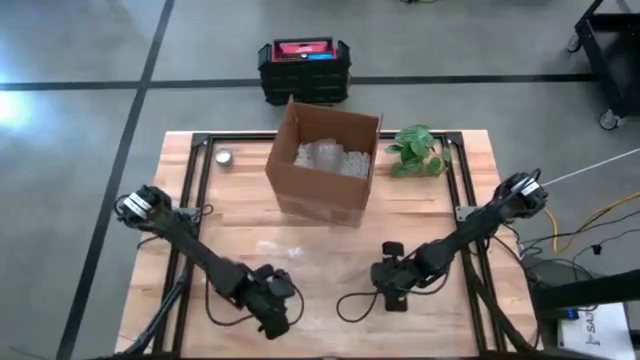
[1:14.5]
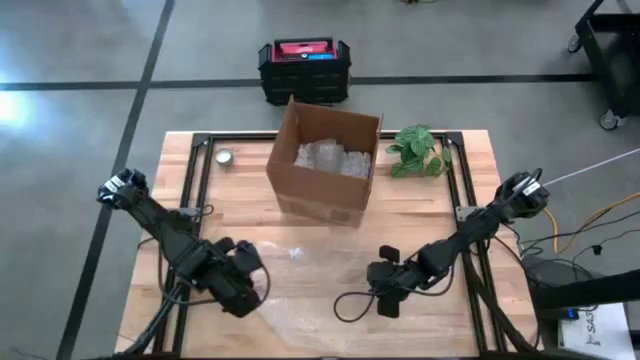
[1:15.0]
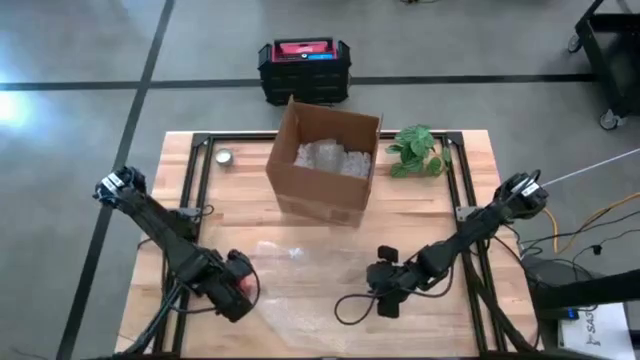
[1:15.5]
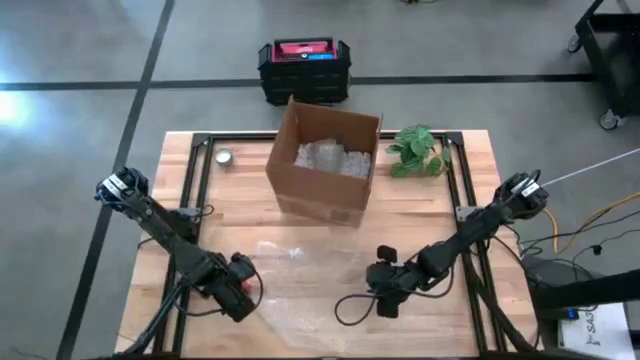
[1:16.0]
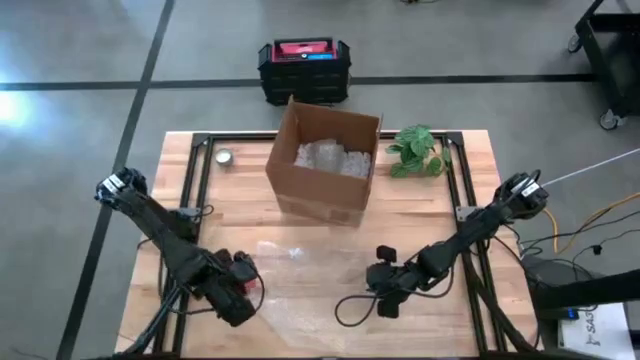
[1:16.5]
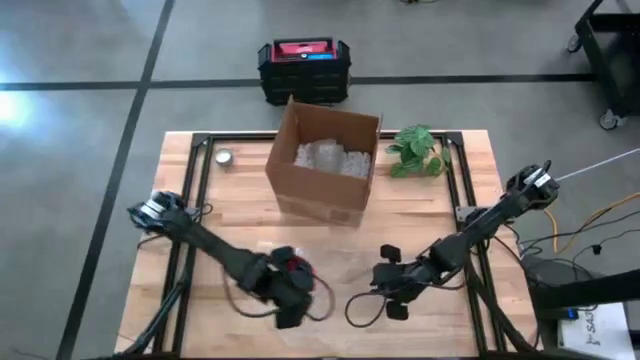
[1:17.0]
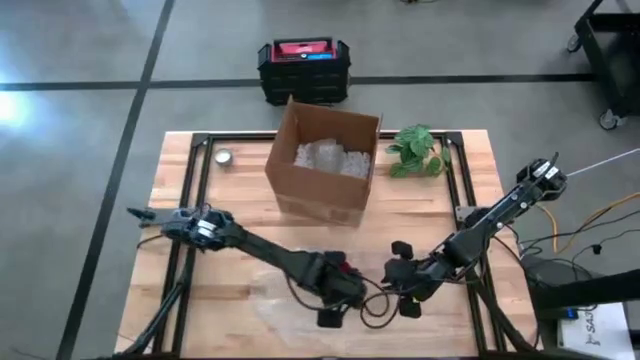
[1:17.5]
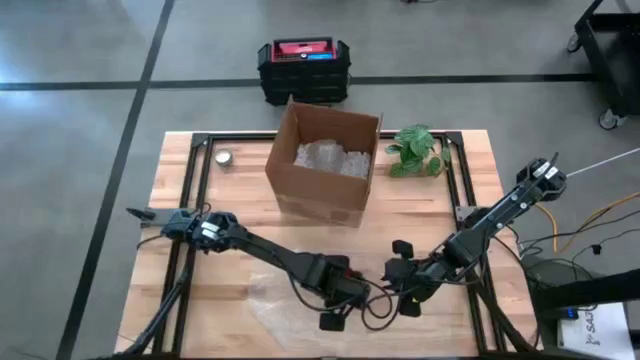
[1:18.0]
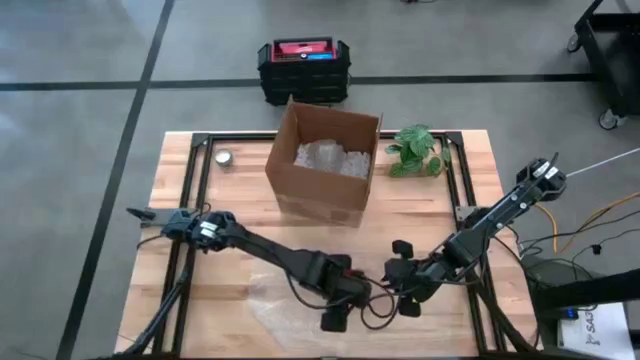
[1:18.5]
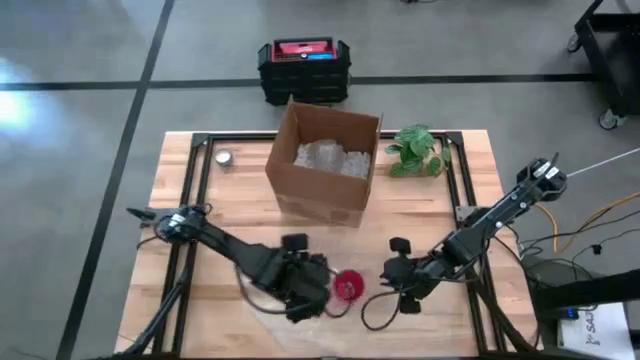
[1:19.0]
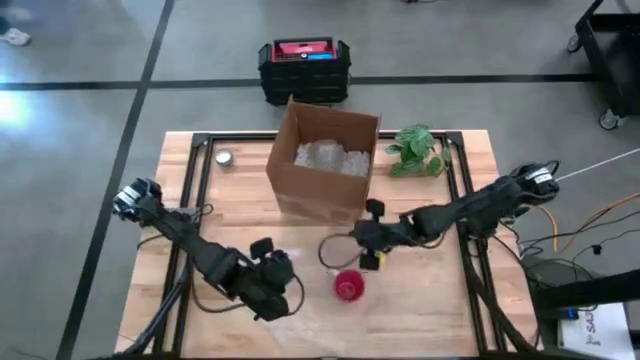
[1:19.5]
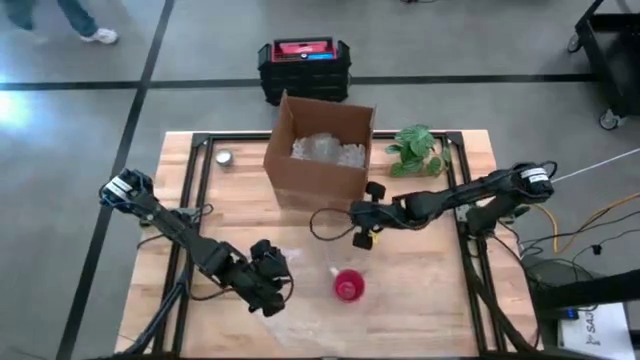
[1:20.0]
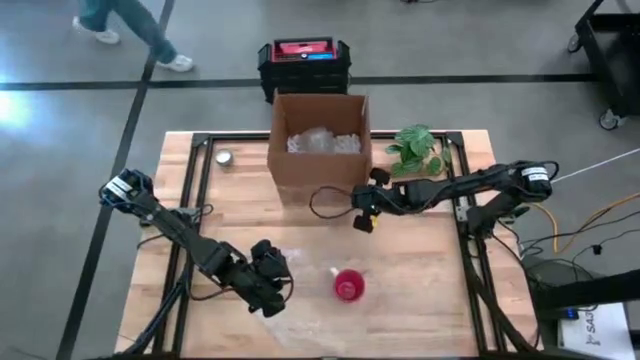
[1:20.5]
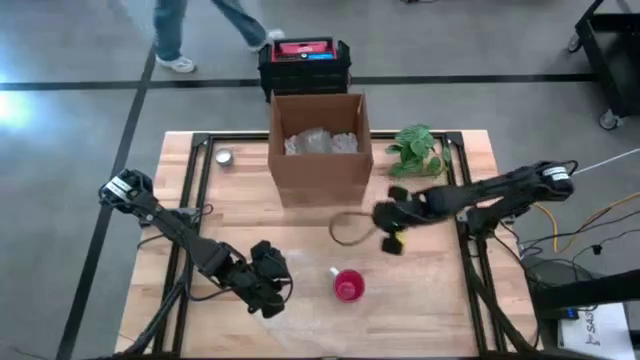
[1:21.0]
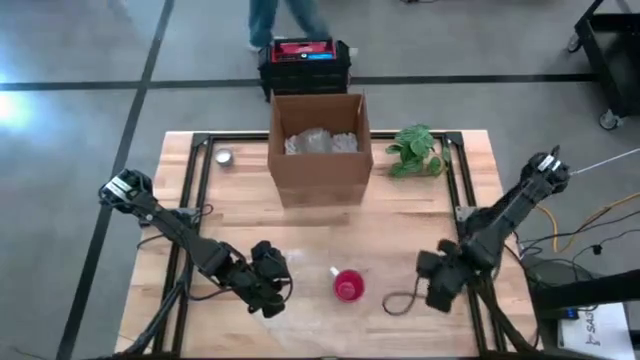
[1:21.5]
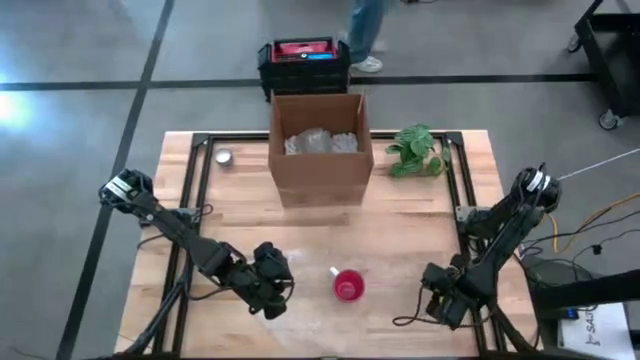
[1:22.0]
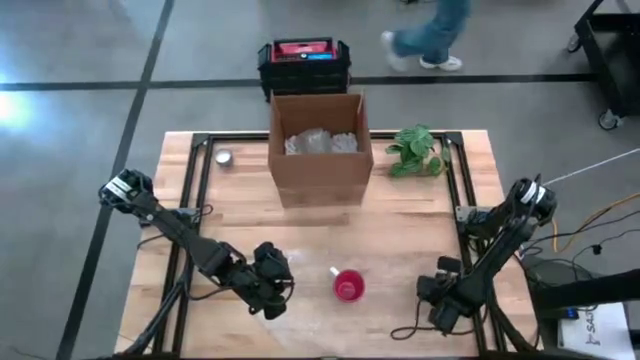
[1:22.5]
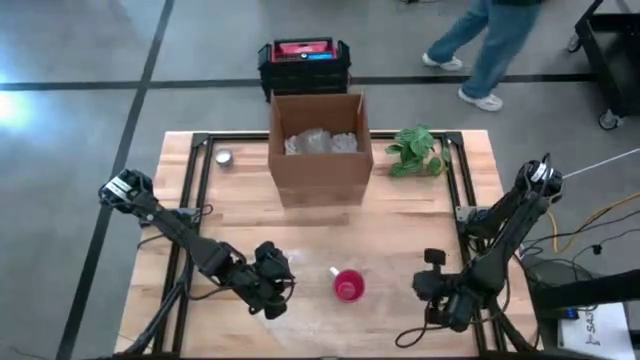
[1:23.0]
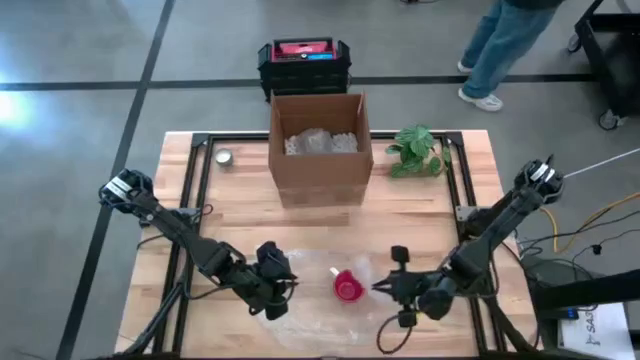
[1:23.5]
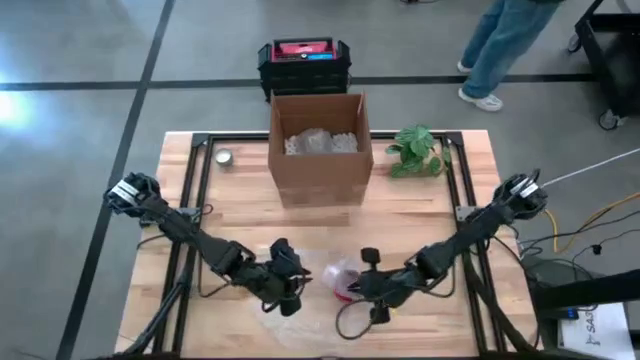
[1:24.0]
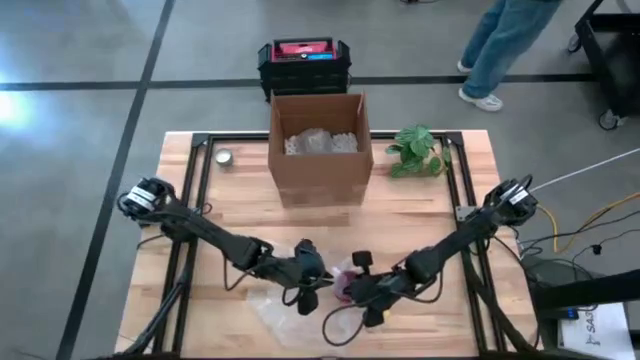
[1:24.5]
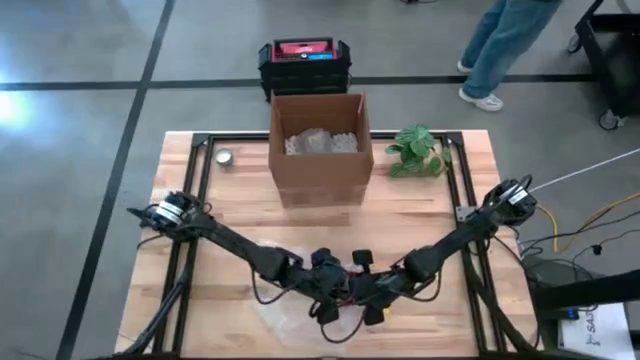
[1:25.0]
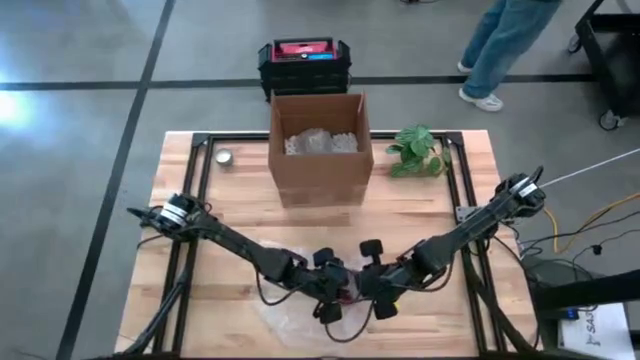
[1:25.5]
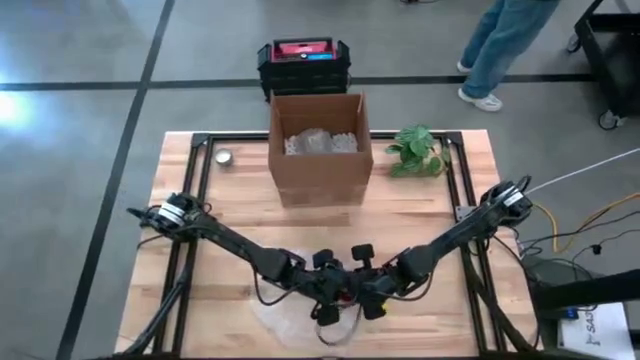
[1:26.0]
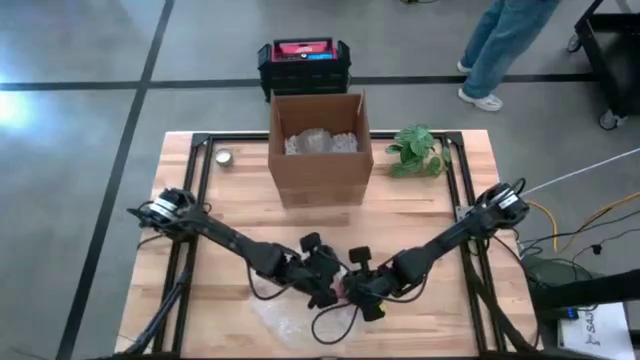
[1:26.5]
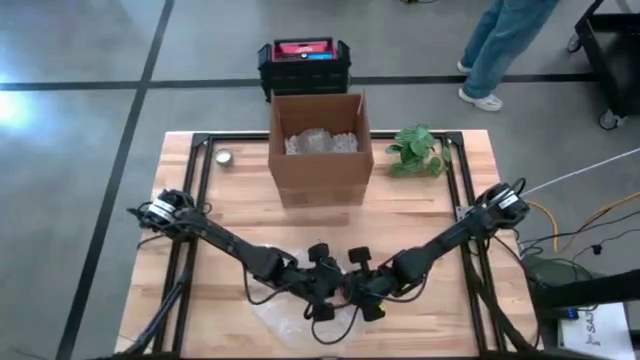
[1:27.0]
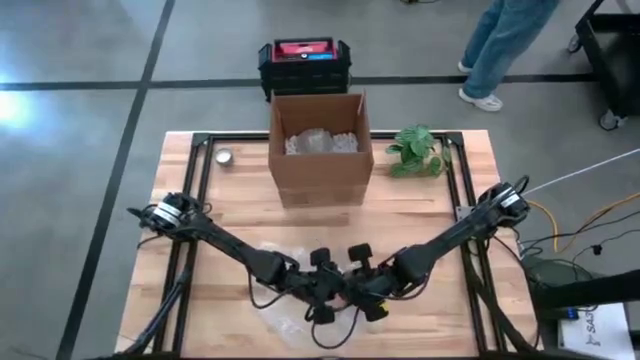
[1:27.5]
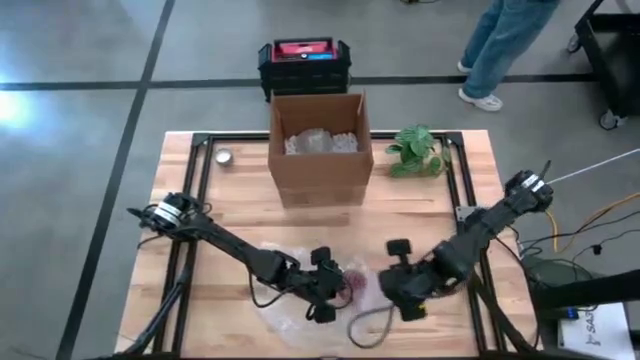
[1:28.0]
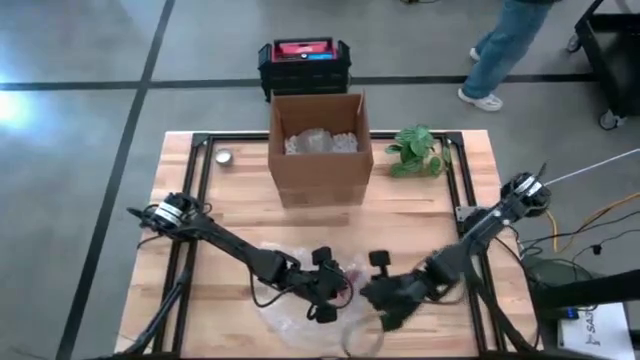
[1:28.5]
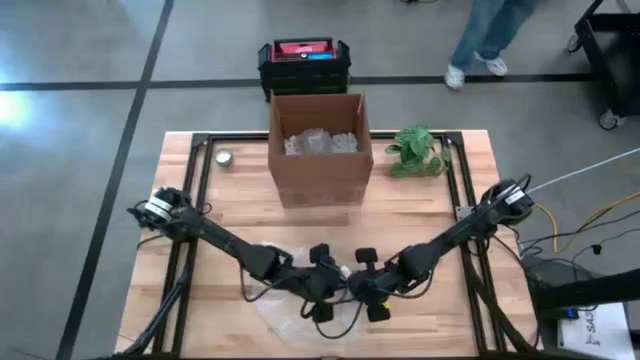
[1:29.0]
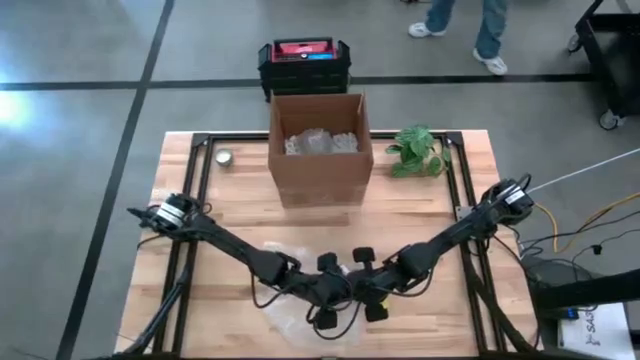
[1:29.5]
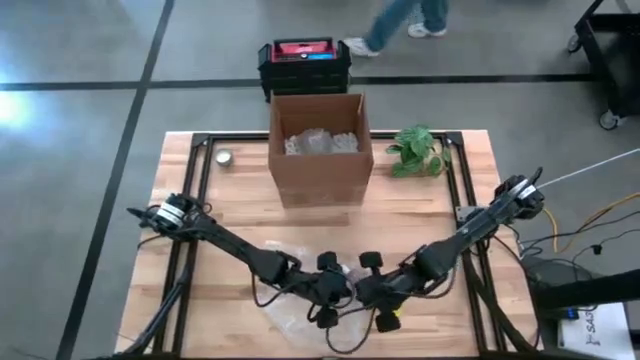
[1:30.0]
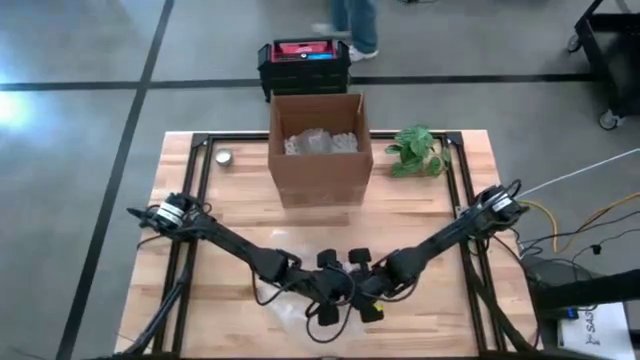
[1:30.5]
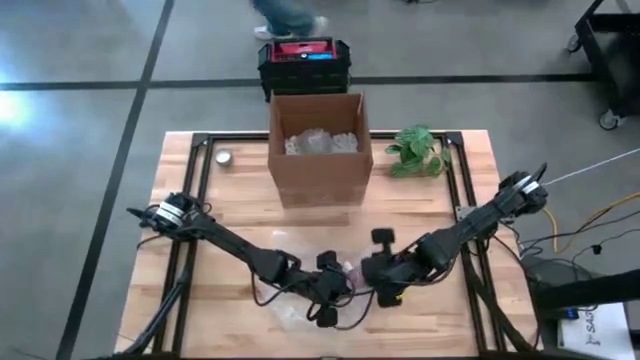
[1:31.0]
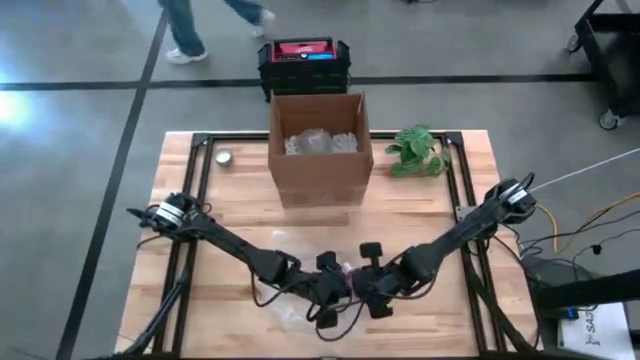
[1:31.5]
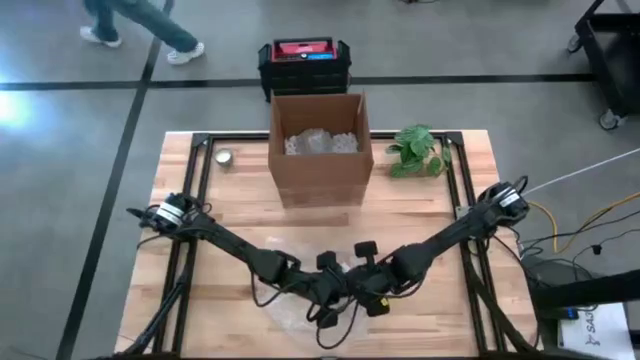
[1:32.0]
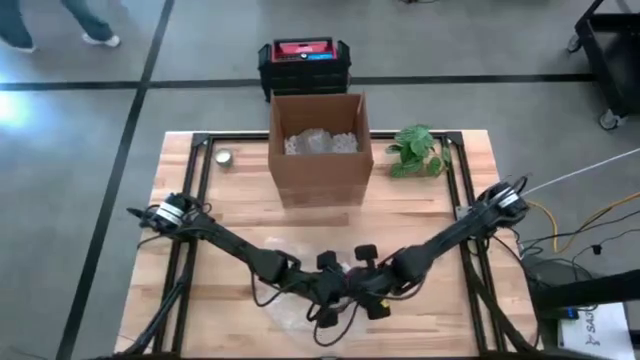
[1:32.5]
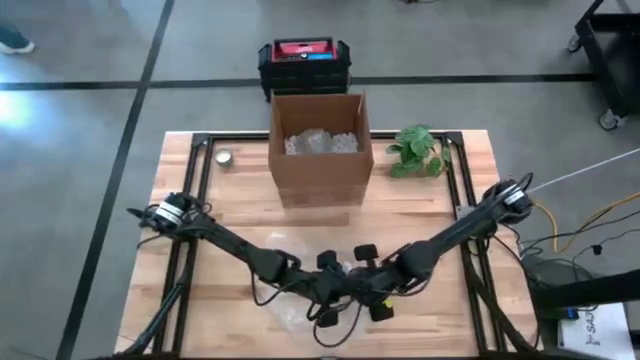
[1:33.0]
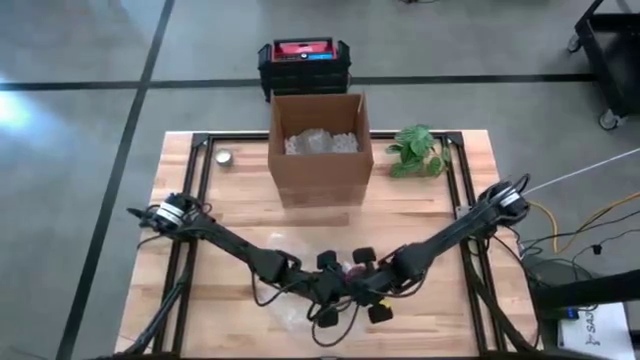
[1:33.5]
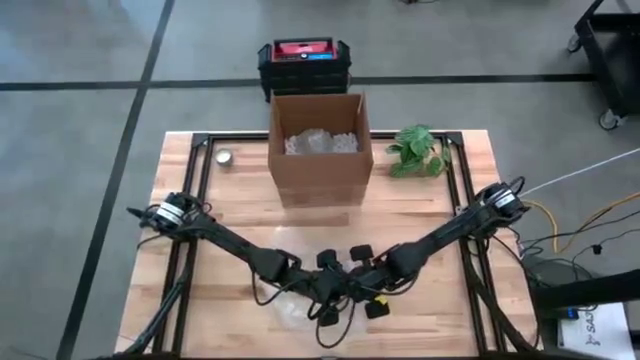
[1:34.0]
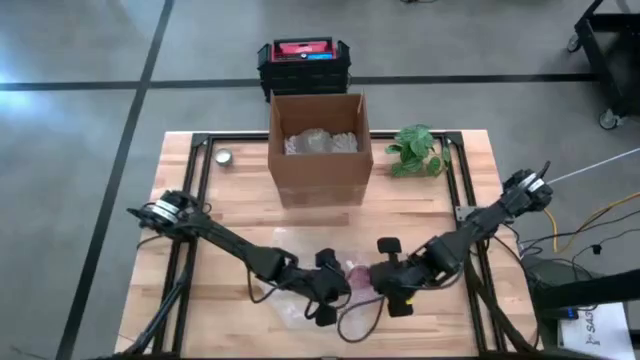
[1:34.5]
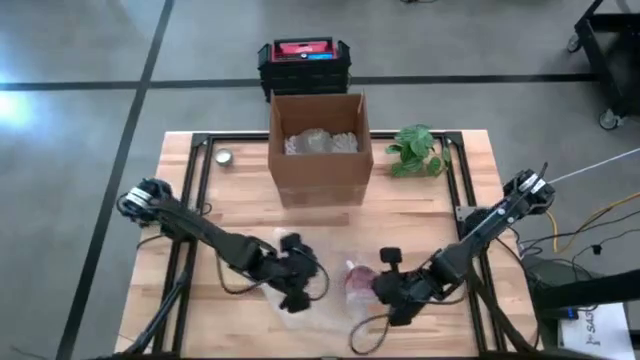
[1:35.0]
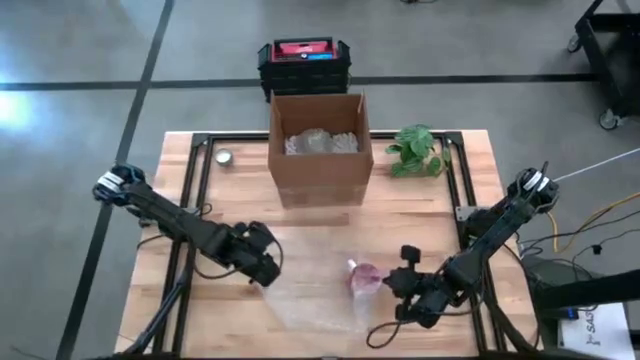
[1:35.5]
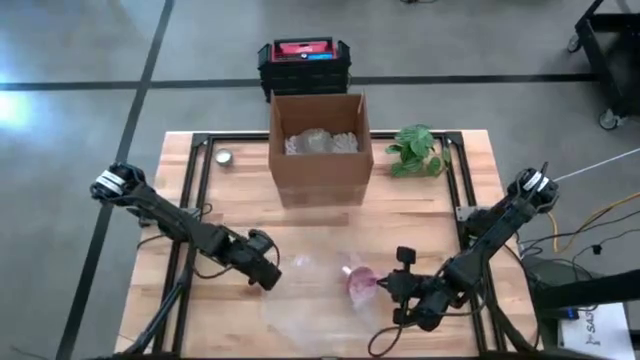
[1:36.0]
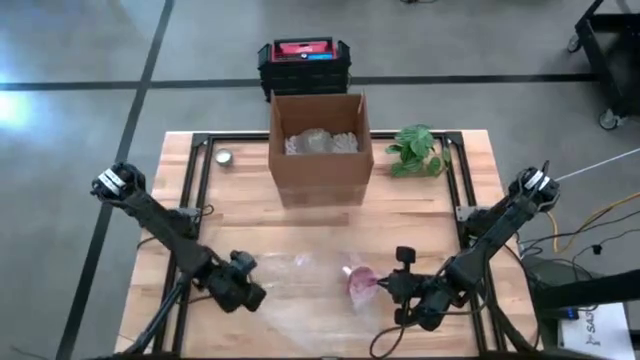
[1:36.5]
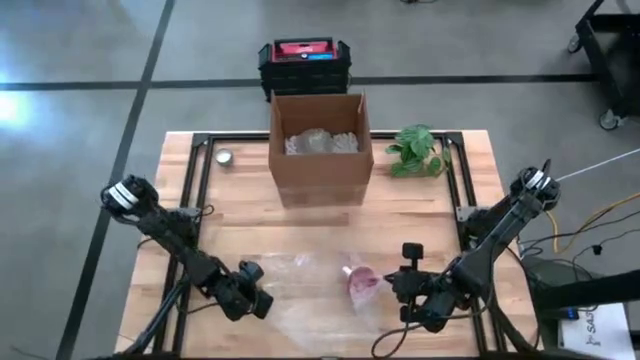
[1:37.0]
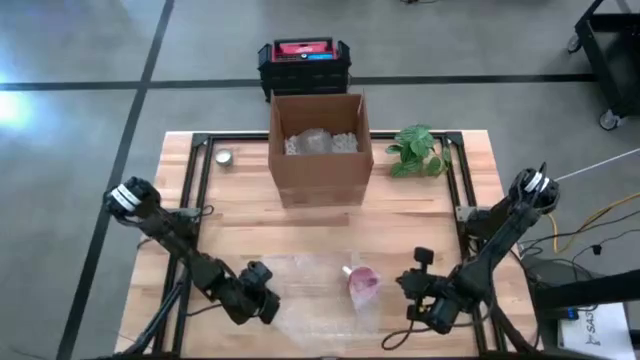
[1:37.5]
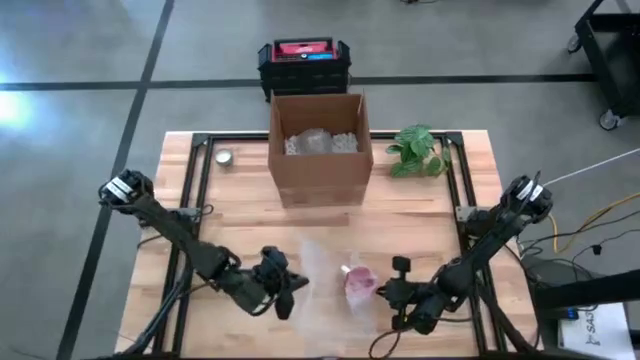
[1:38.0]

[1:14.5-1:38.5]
Task: wrap mug
Wrap the orange mug with bubble wrap
